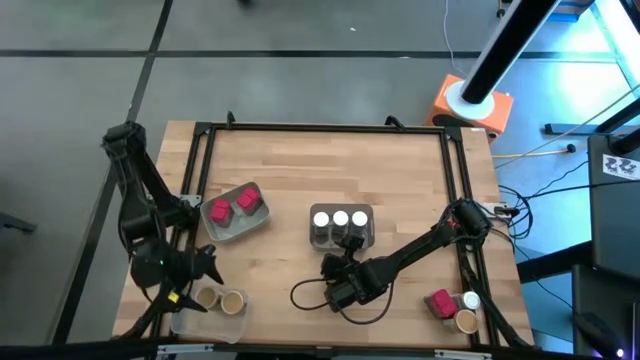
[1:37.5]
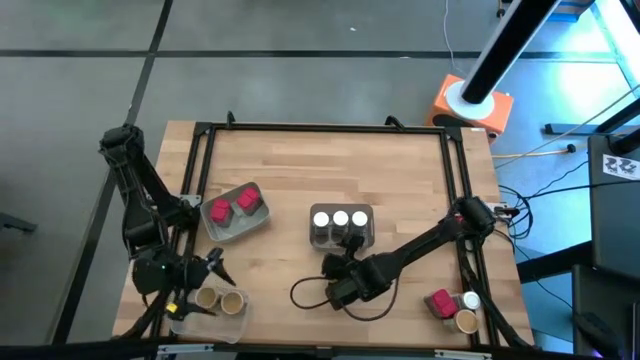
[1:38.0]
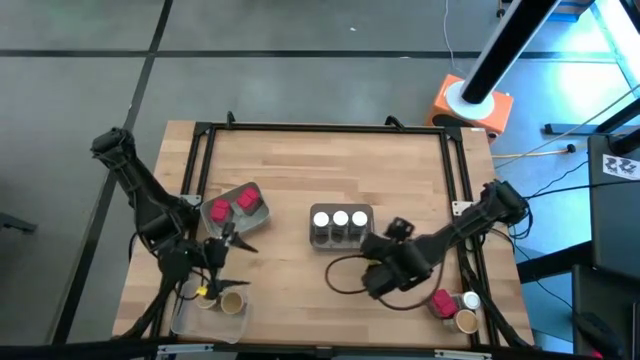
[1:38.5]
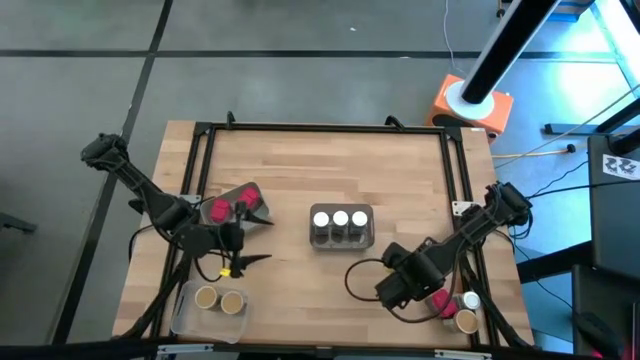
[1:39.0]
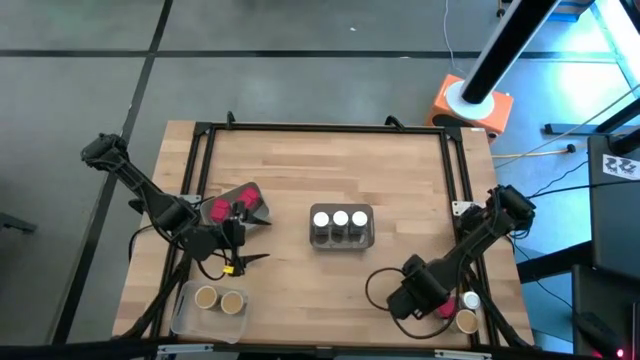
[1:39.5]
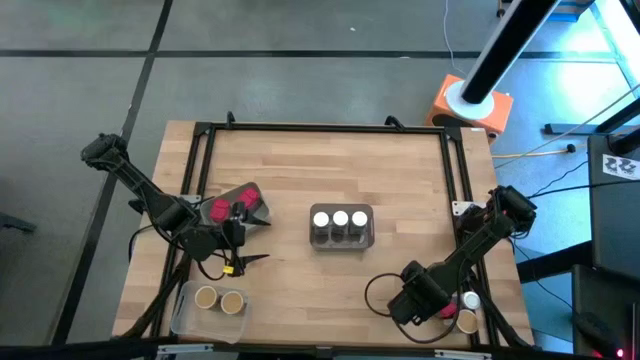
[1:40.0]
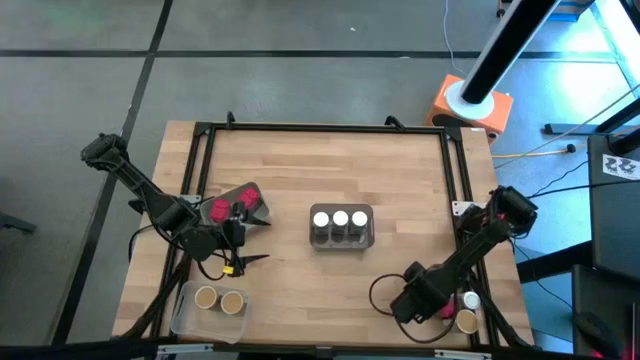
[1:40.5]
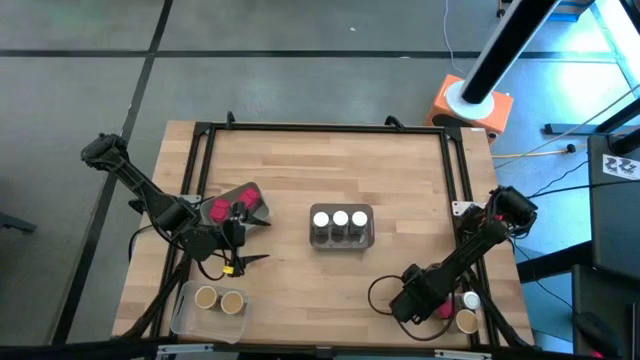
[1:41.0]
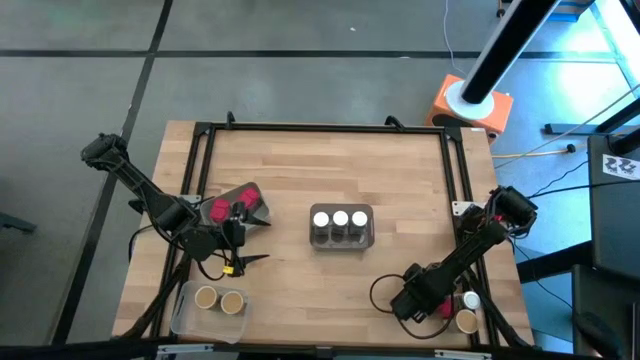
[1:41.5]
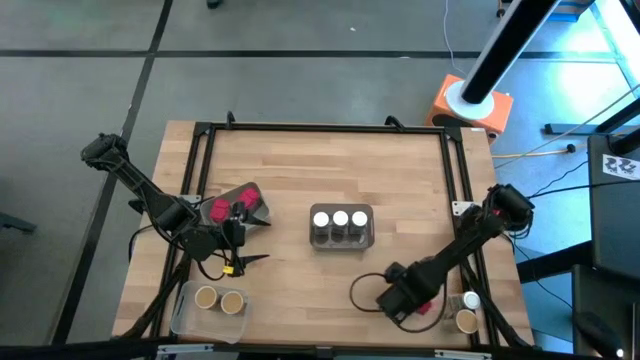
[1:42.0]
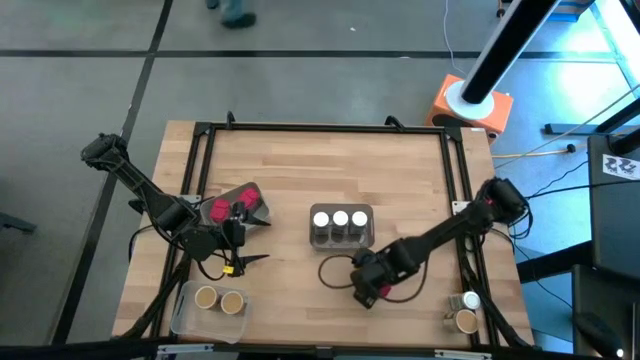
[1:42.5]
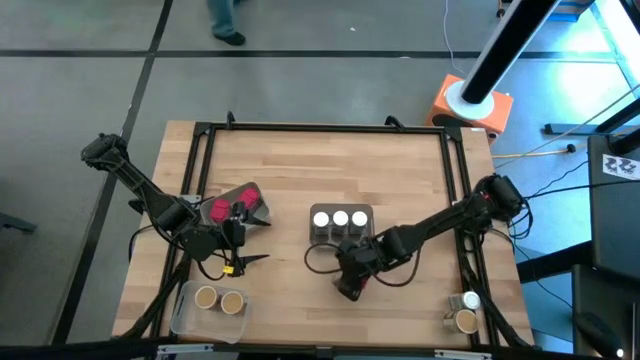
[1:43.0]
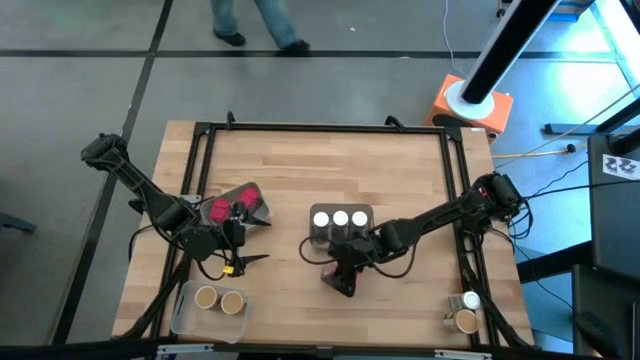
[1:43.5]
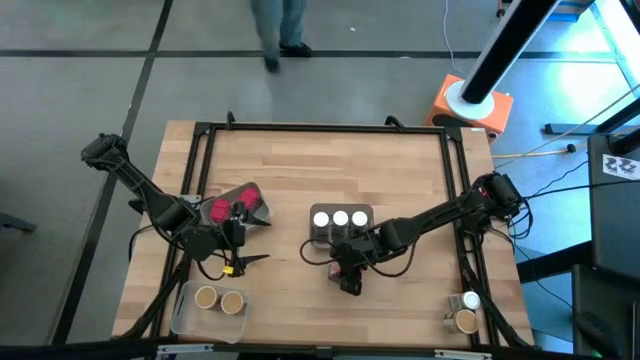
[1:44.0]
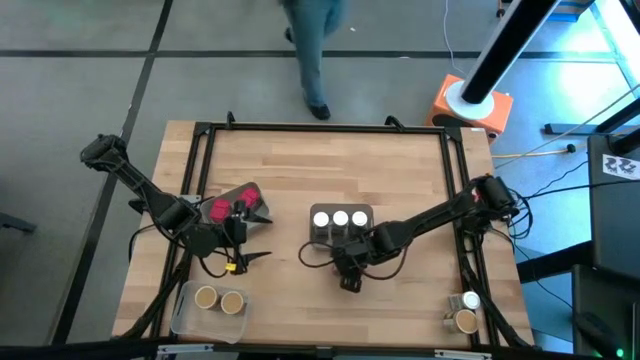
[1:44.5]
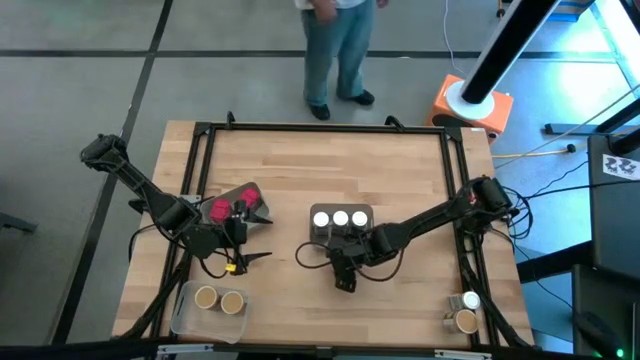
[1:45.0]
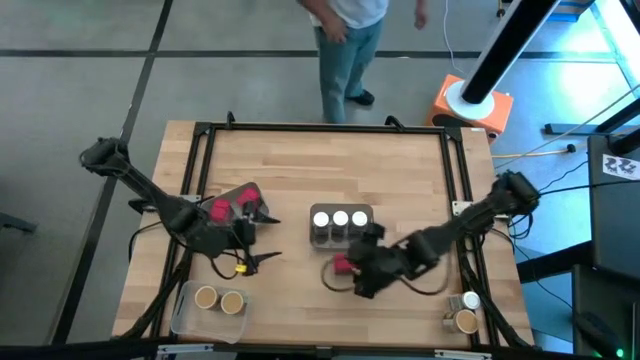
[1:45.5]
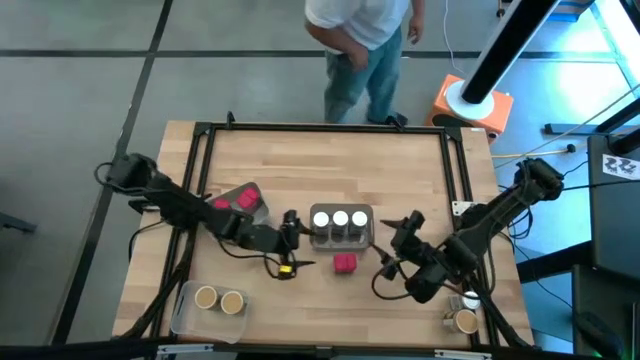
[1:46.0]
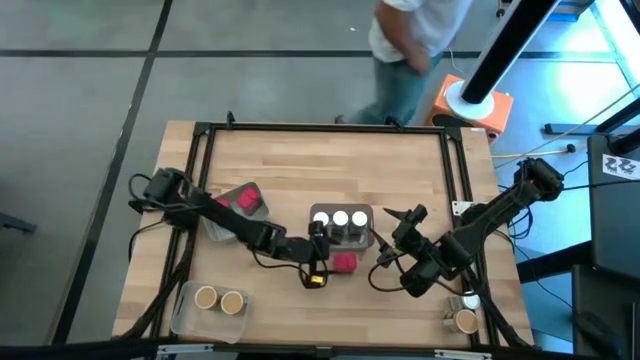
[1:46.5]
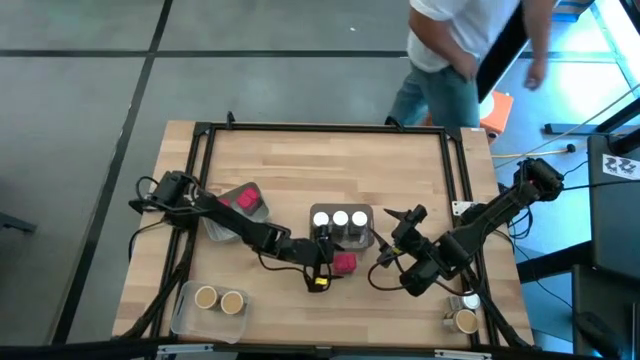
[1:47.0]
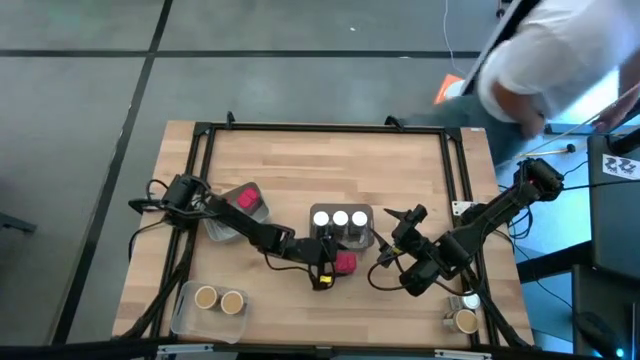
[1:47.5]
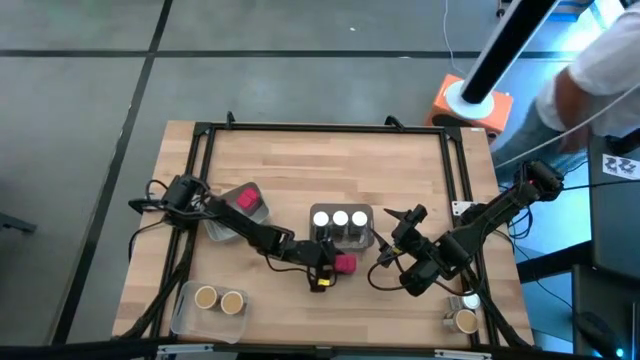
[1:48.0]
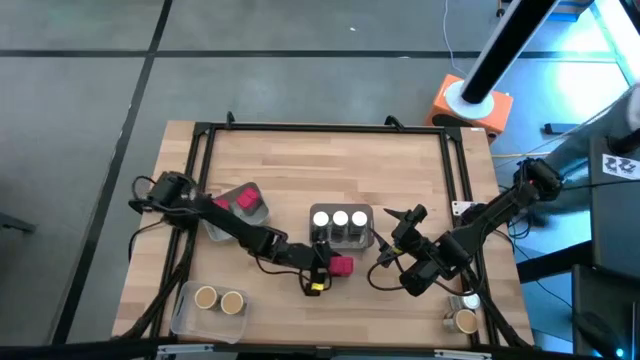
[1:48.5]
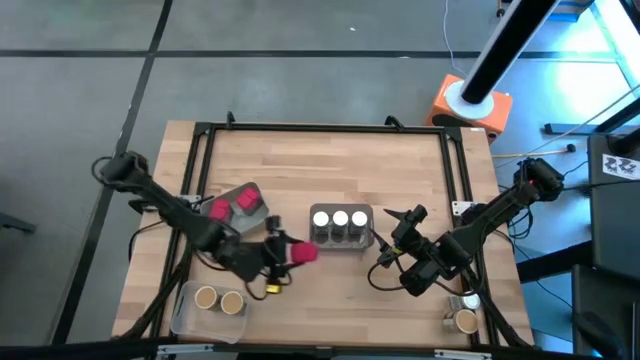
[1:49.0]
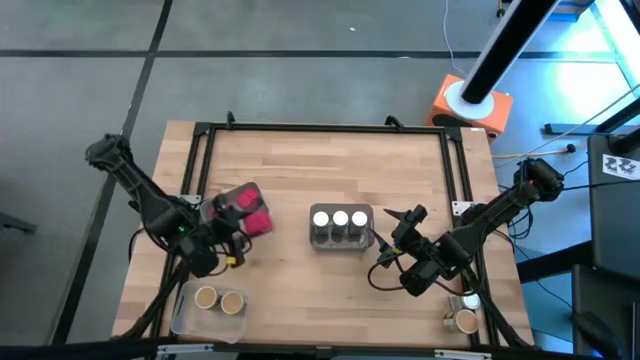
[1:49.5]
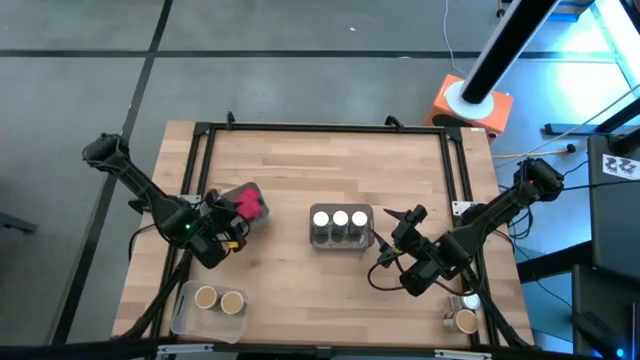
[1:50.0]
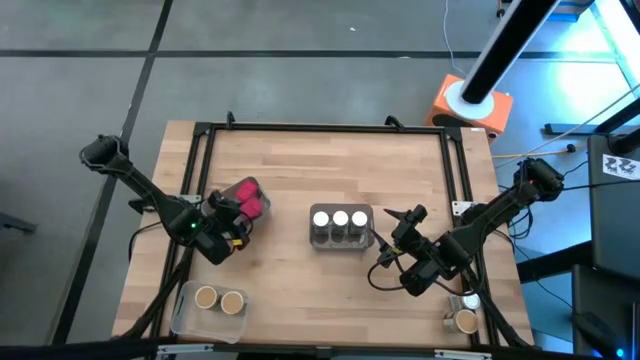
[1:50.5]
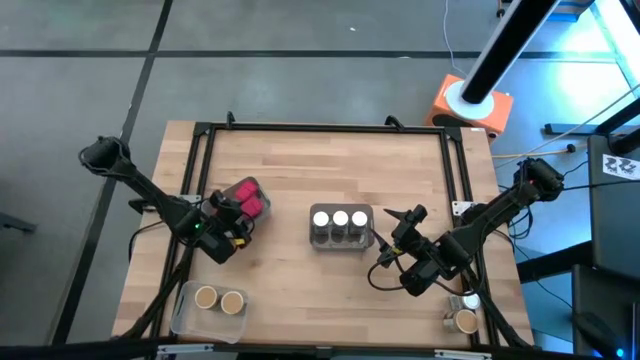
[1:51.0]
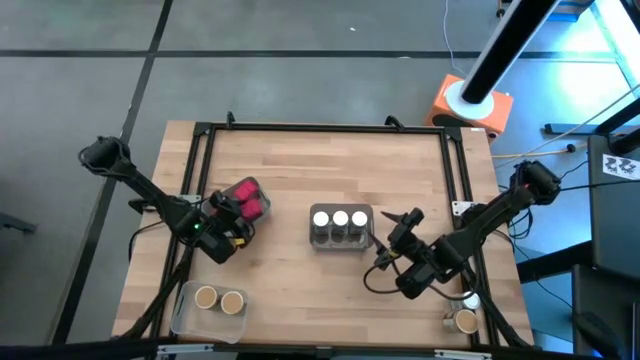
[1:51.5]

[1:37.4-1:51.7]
Task: Sort spices by type
Put the red seasoning can into the gray bin

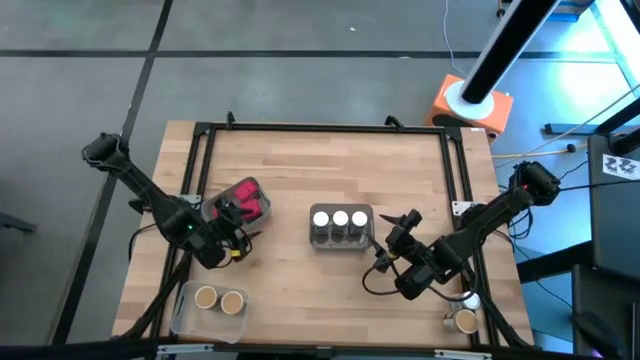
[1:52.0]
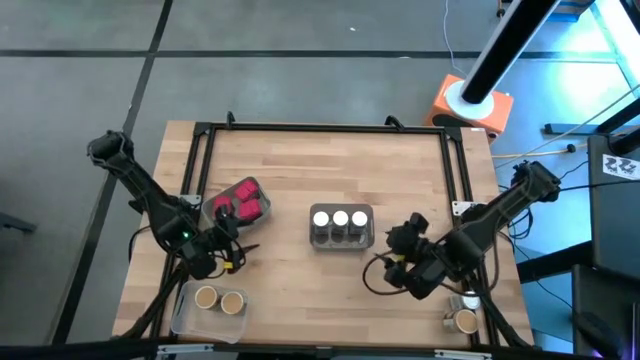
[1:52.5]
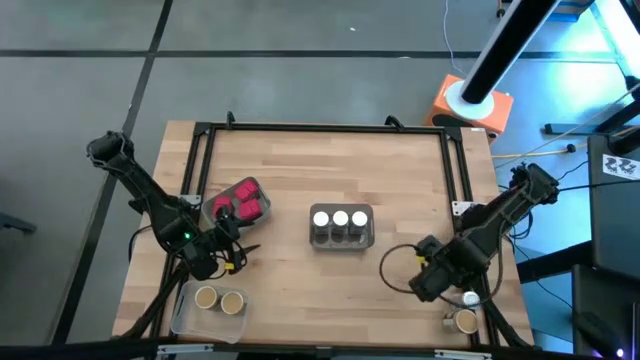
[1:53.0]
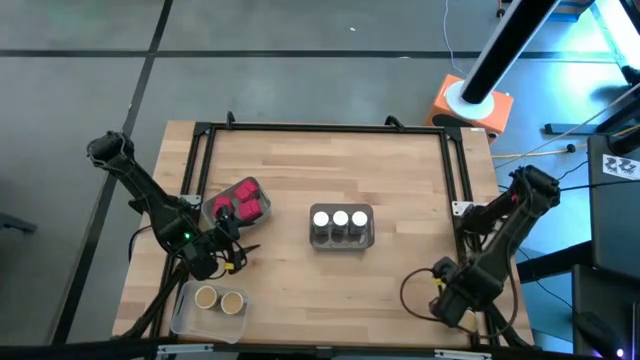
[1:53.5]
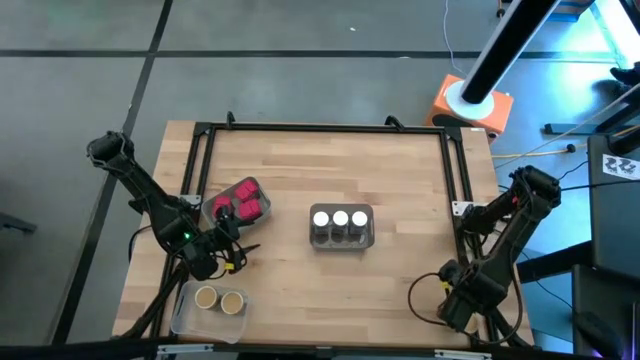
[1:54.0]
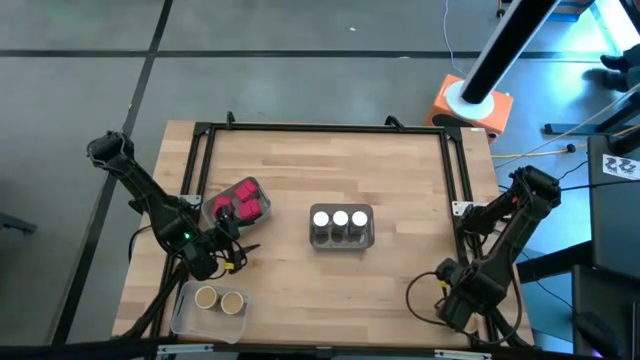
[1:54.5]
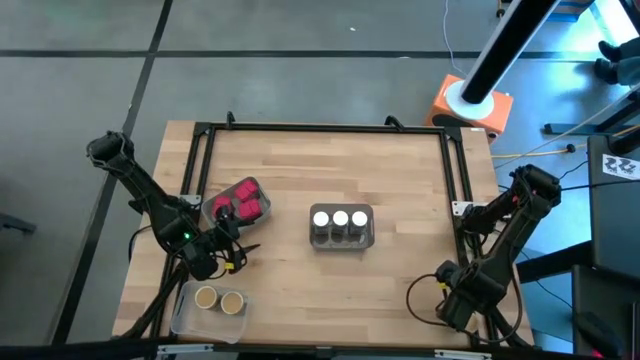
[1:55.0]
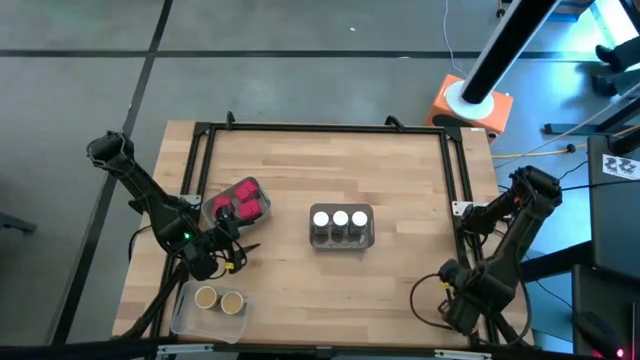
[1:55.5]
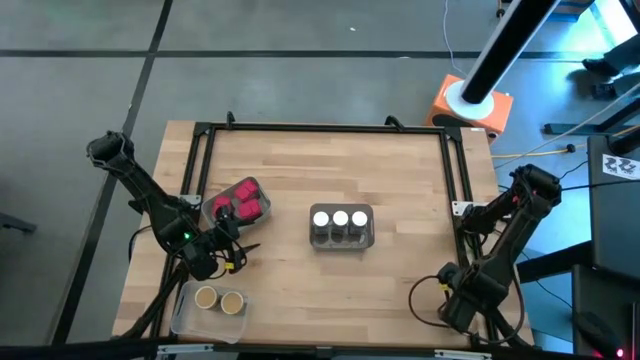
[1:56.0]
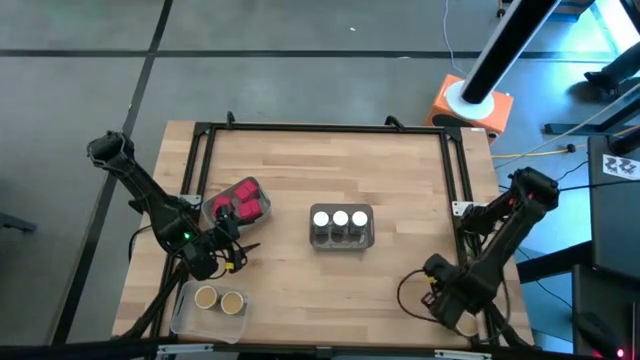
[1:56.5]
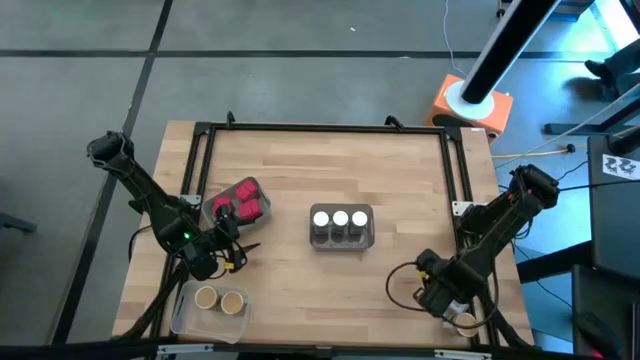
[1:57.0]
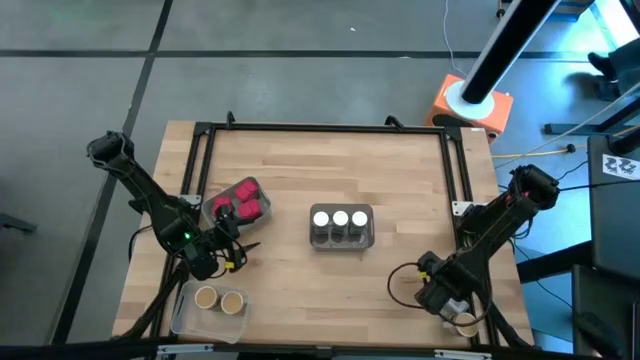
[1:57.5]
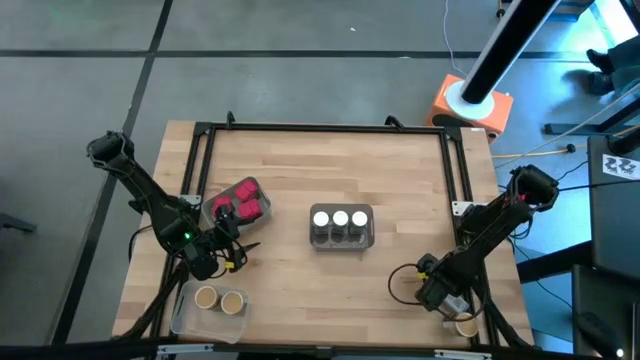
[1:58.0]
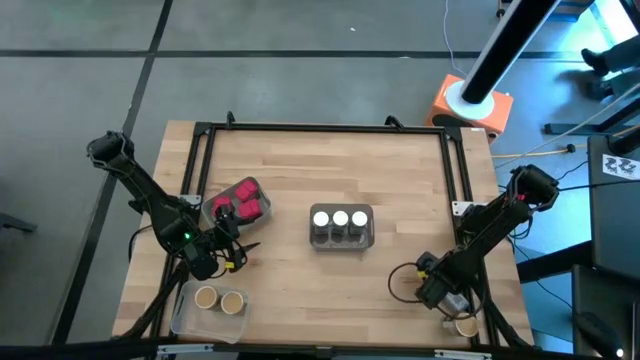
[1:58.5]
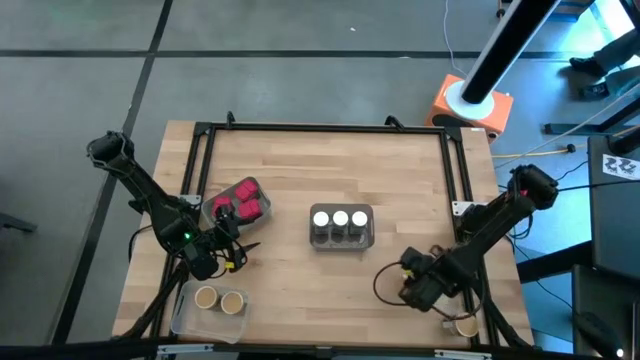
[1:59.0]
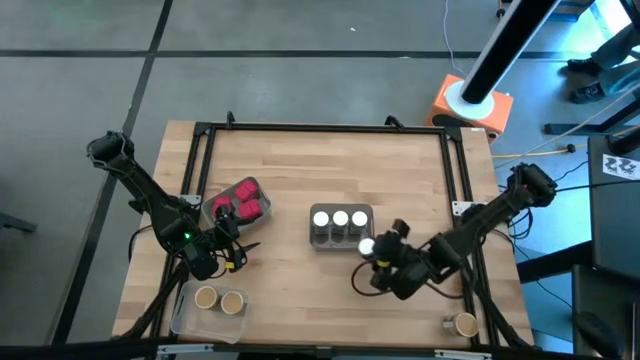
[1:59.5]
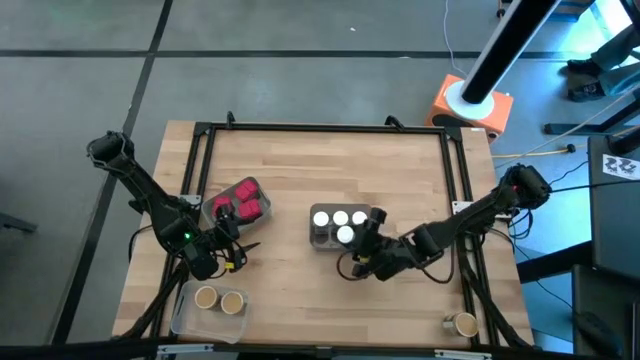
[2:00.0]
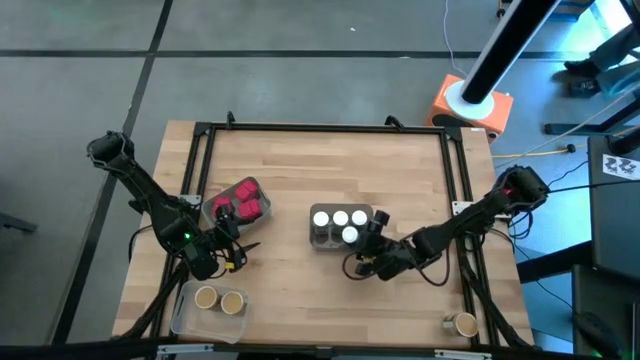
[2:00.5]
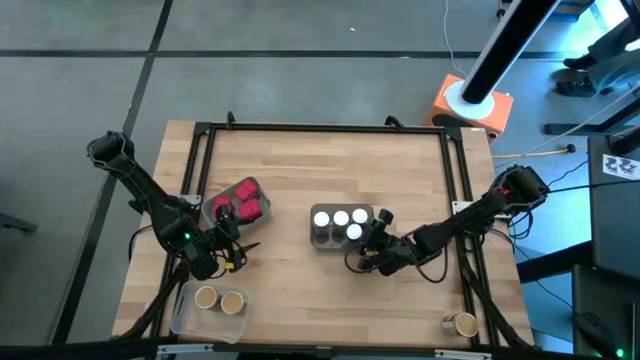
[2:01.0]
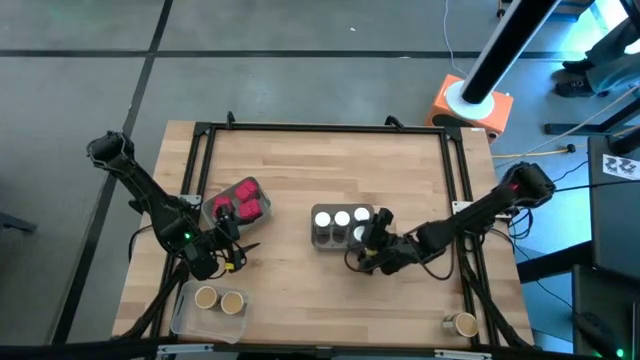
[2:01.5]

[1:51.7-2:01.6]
Put the white seasoning bottle into the black bin
